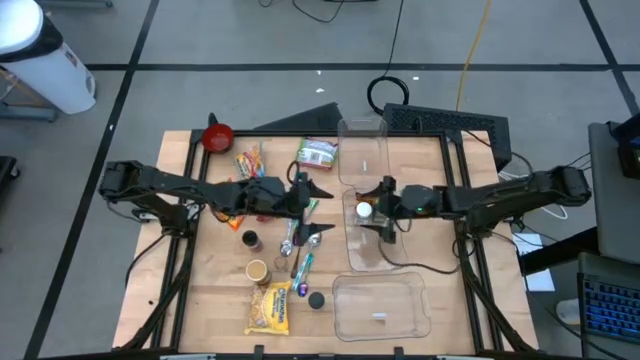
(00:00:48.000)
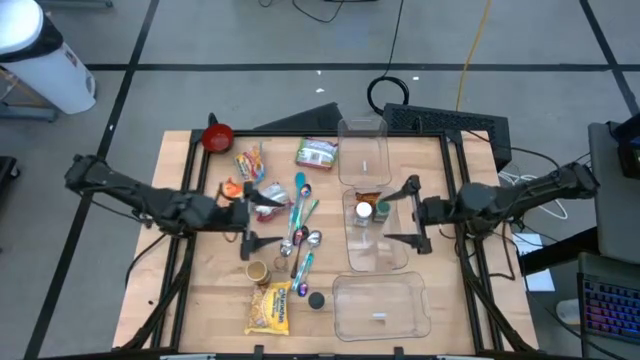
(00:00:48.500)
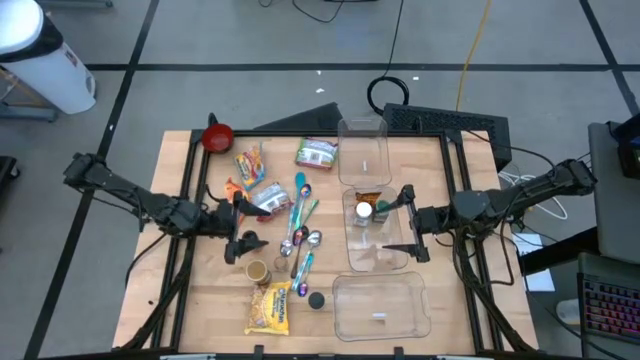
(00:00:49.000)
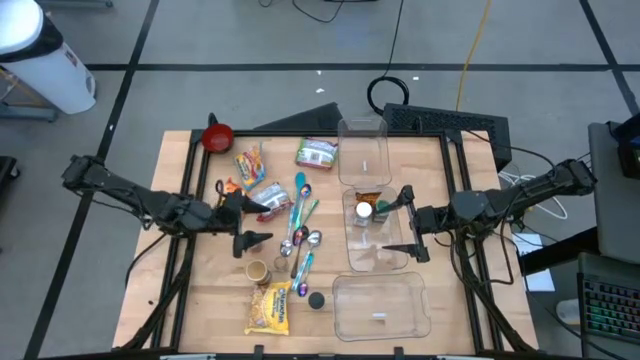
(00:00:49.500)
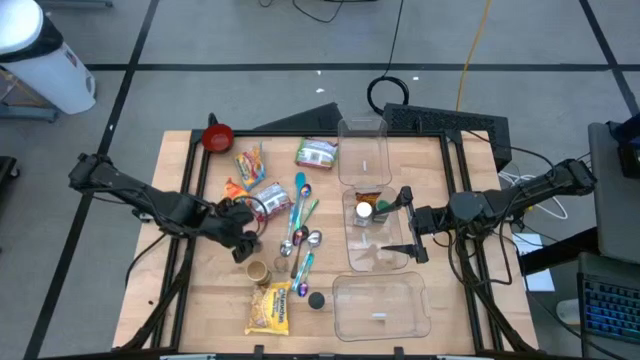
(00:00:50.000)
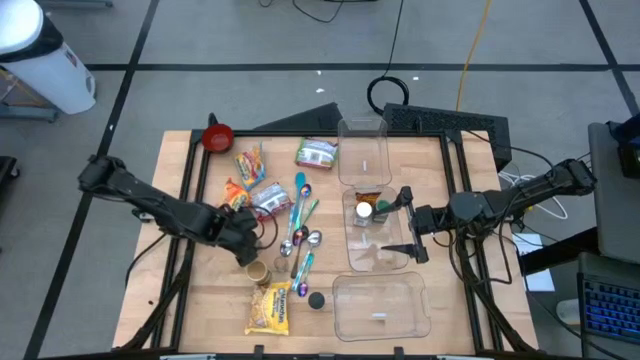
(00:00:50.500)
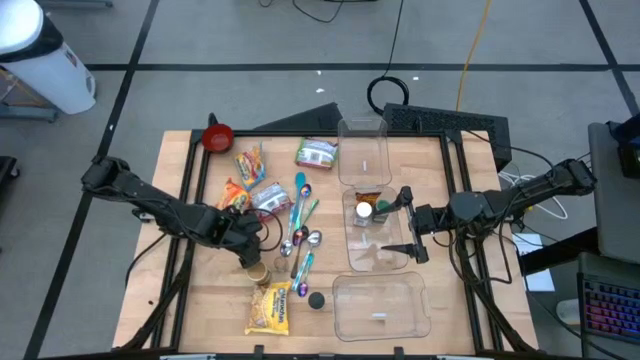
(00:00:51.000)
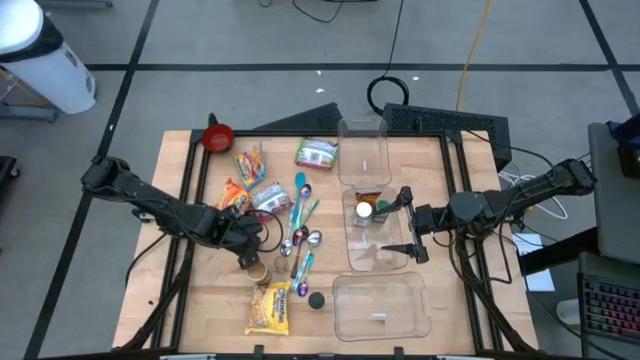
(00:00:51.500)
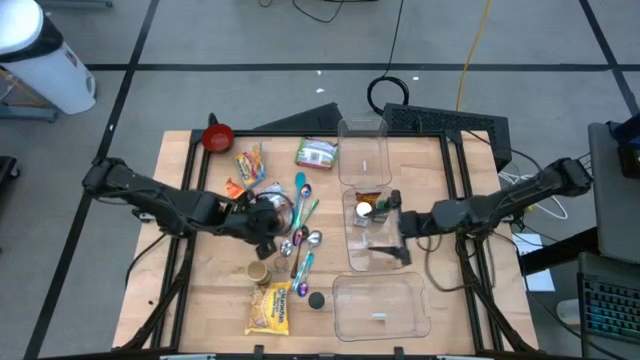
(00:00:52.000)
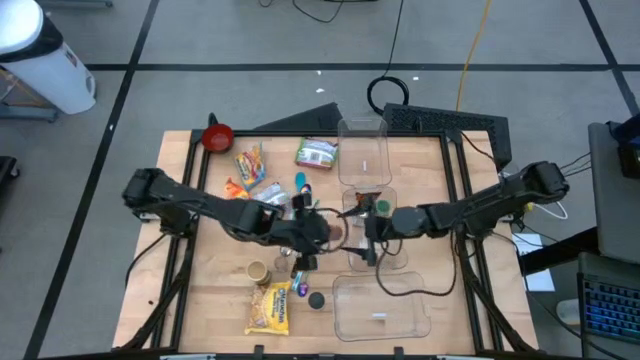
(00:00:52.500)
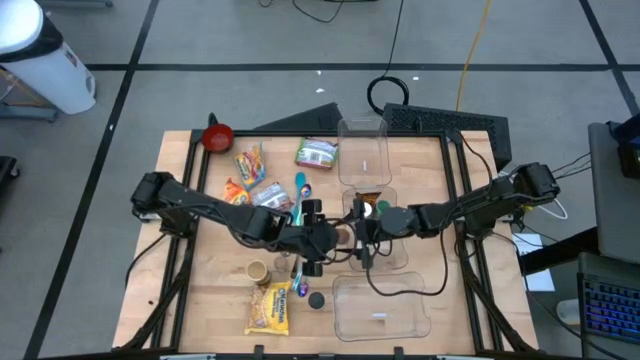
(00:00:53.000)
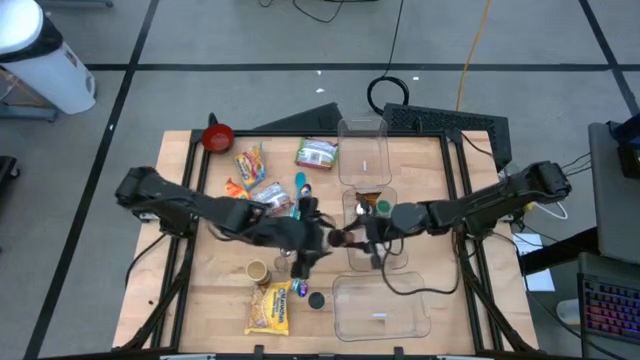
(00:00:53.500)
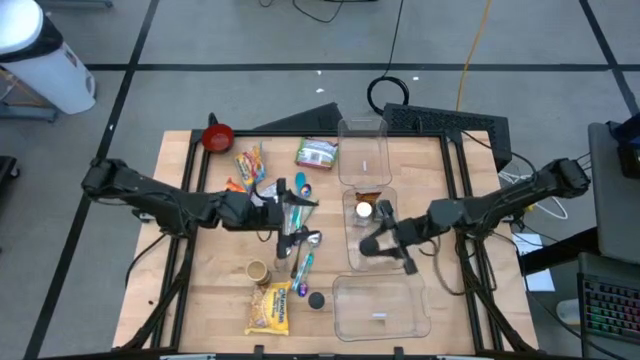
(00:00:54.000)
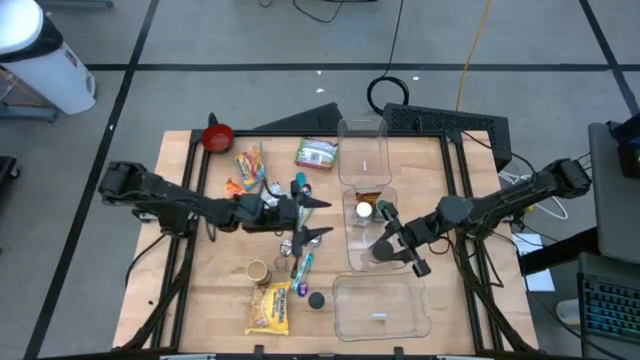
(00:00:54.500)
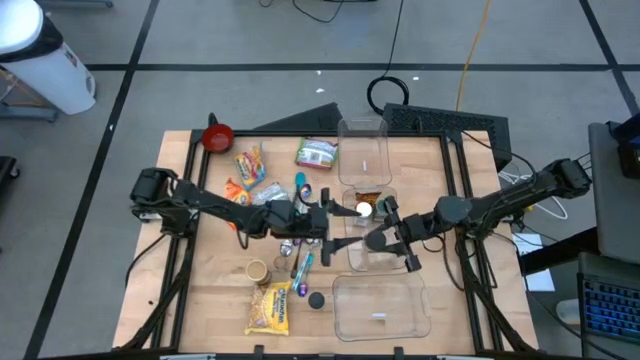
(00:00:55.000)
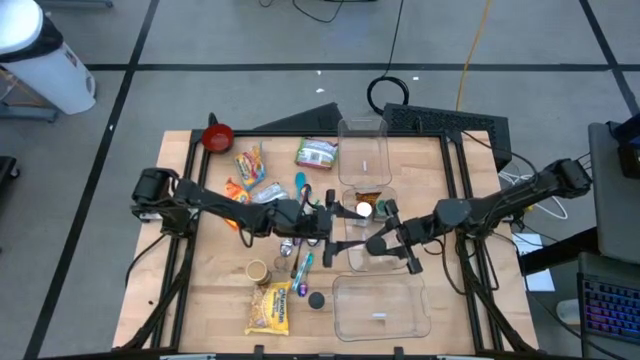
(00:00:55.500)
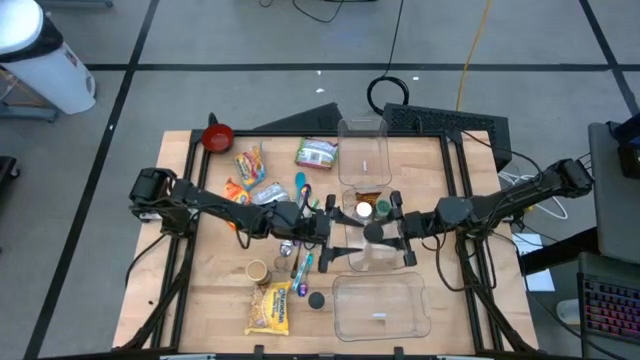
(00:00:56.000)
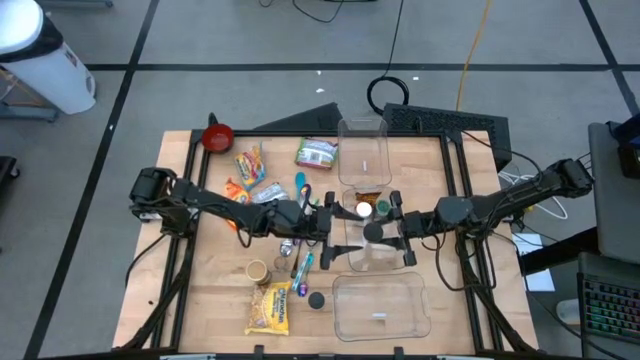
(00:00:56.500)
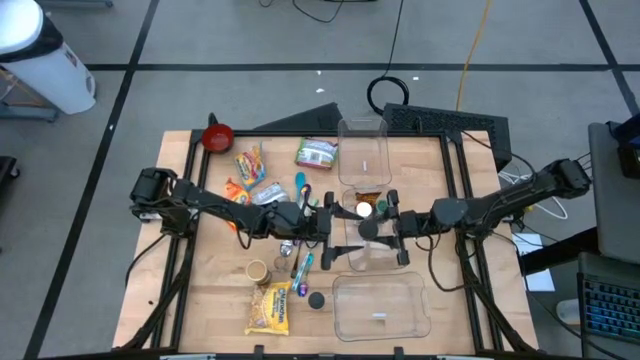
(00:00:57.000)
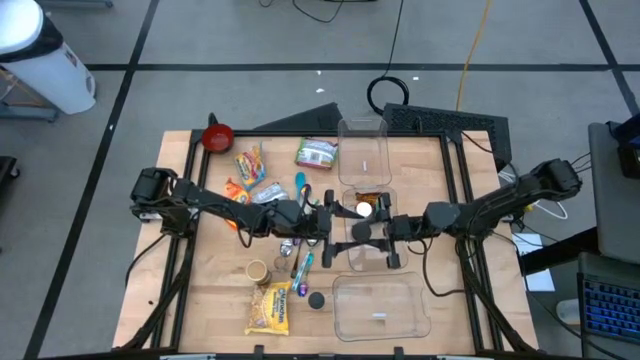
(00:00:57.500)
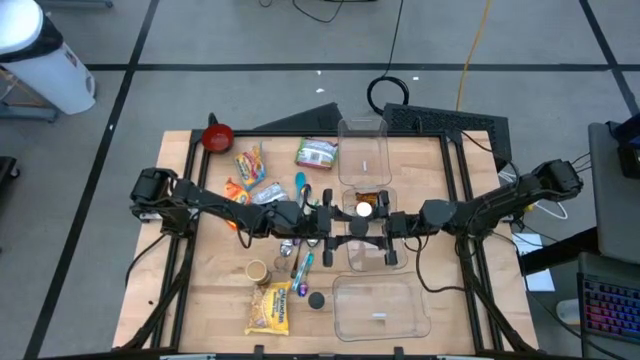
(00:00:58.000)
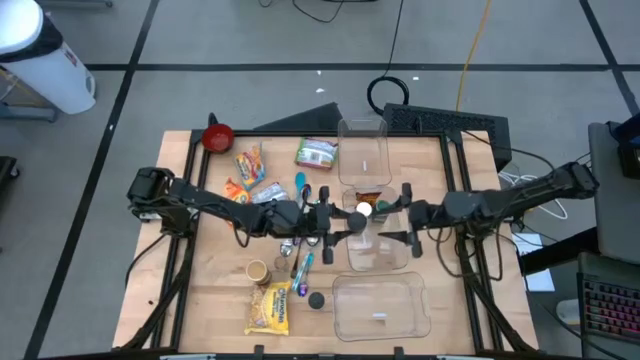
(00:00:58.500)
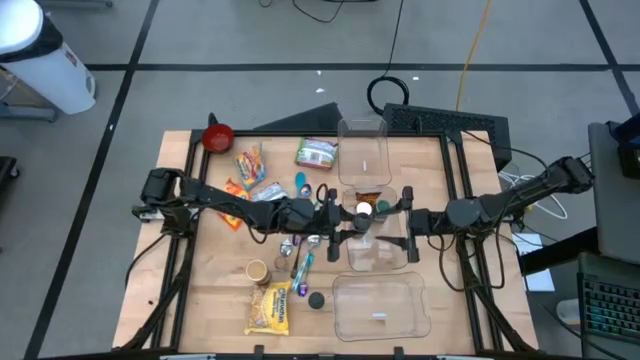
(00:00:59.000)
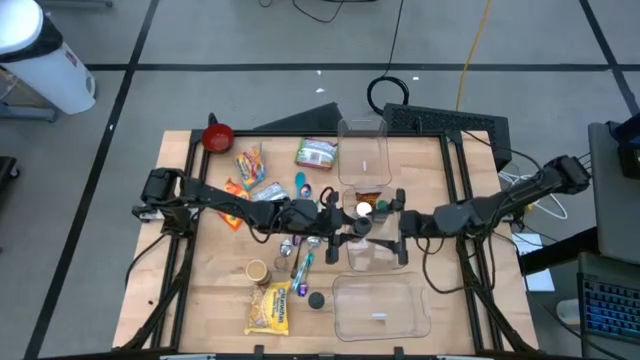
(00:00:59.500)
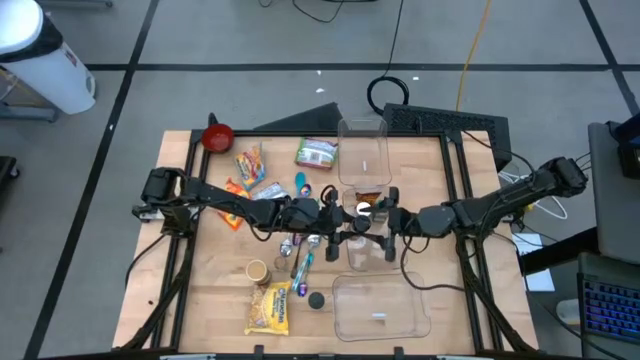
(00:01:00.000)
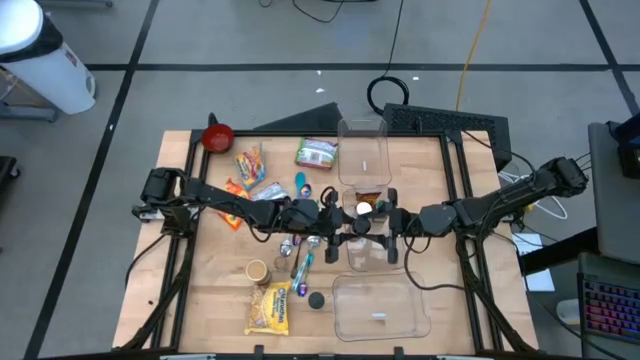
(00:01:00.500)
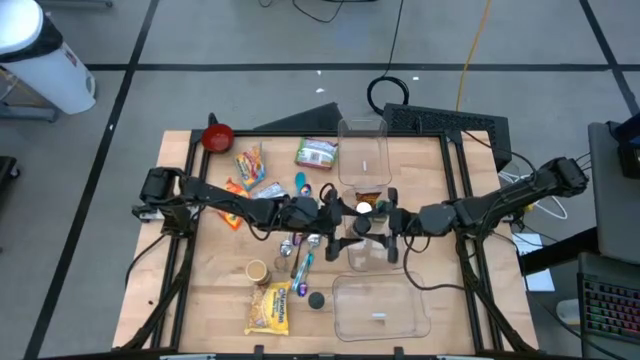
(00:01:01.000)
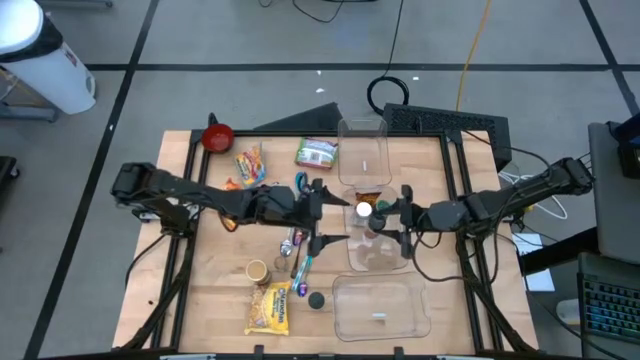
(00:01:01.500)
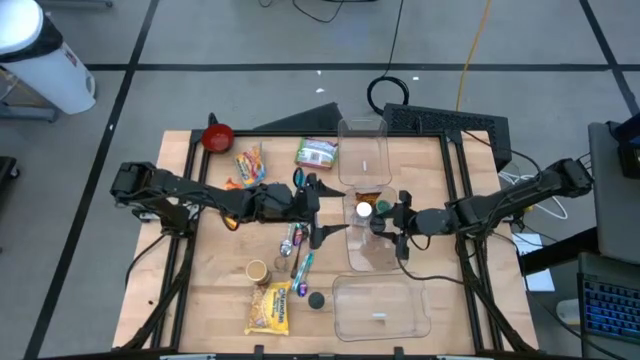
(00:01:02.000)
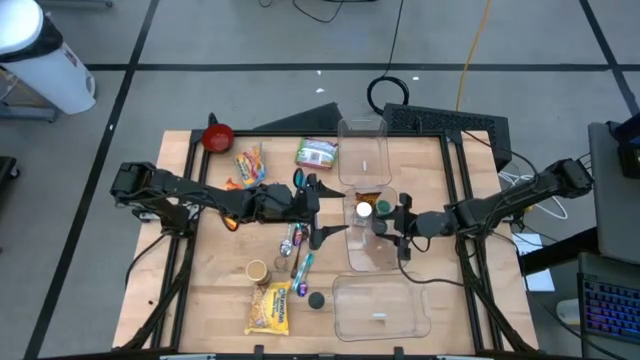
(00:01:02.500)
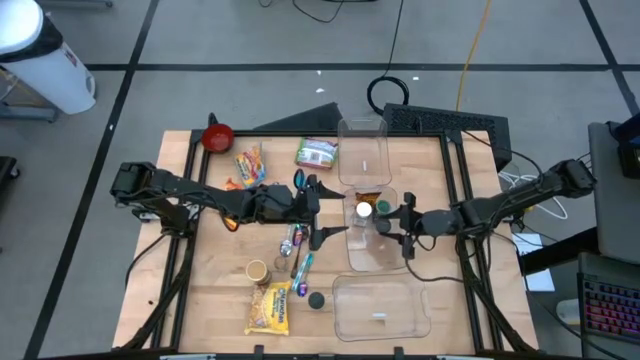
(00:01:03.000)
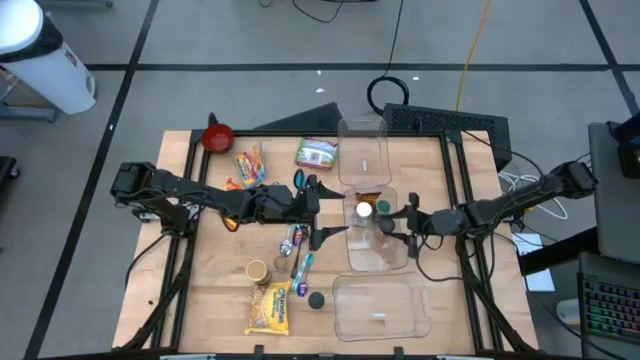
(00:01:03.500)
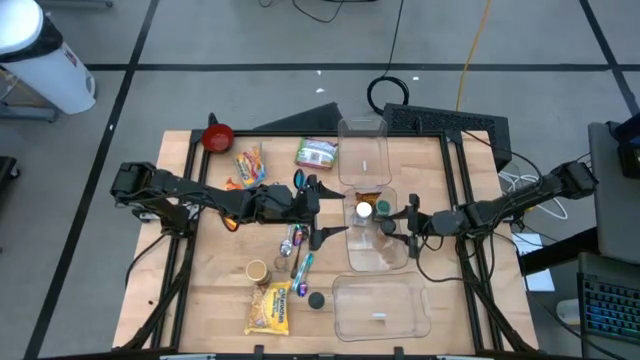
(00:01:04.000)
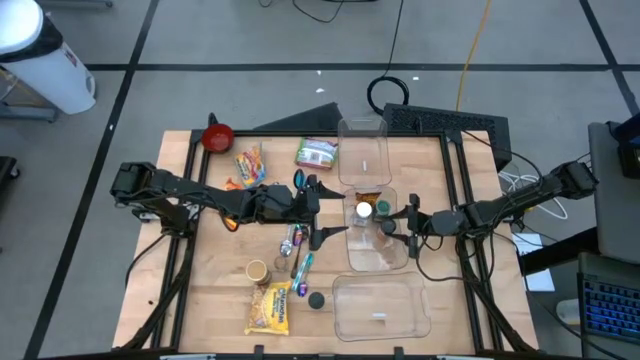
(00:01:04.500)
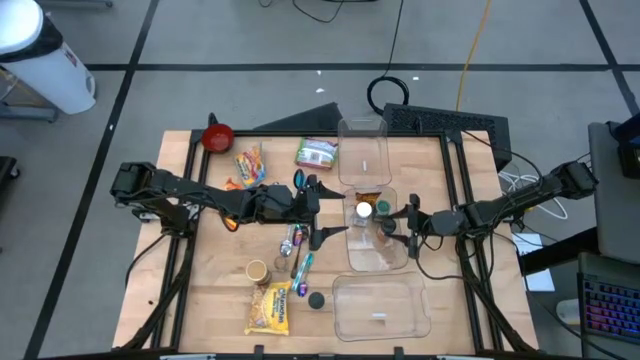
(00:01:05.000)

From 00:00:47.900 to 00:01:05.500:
Task: Pick & Place Food Item
Put the orange seasoning bottle into the middle transparent bin
